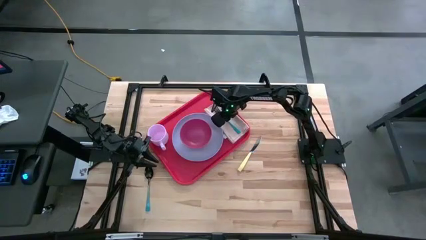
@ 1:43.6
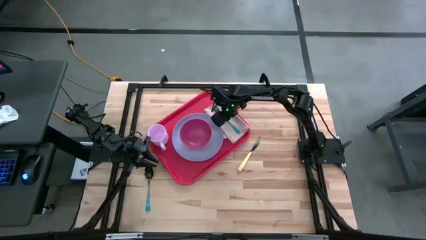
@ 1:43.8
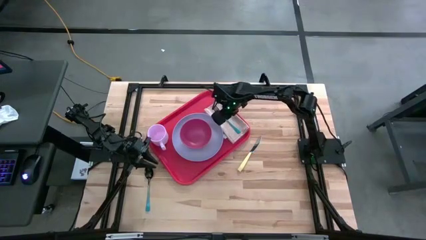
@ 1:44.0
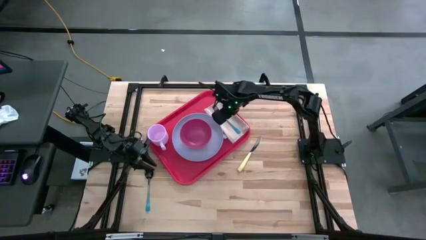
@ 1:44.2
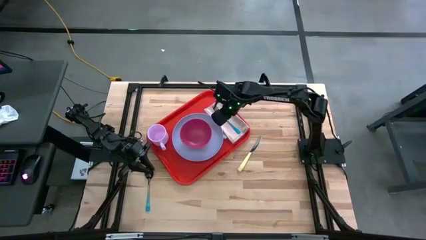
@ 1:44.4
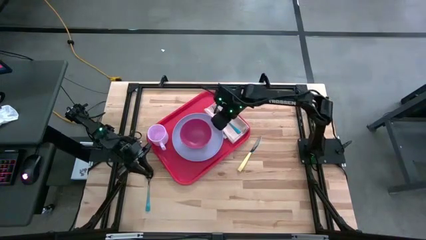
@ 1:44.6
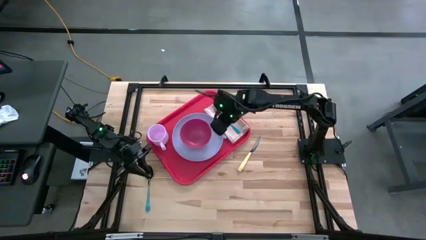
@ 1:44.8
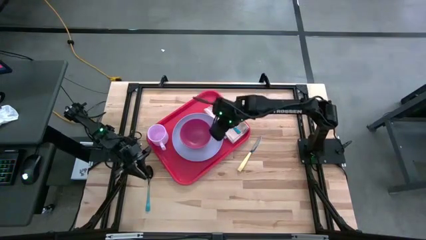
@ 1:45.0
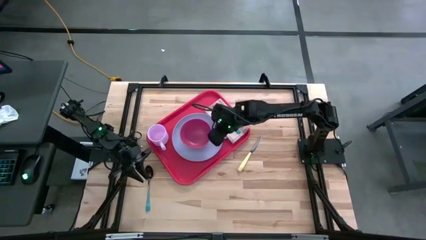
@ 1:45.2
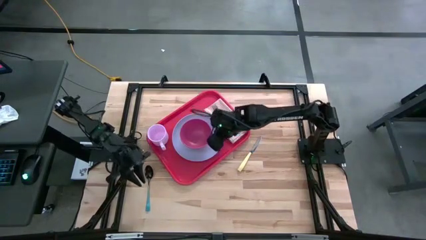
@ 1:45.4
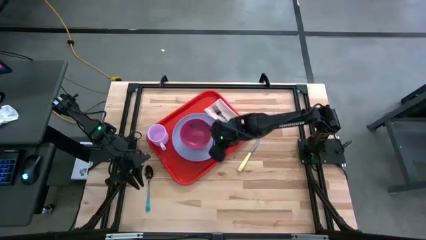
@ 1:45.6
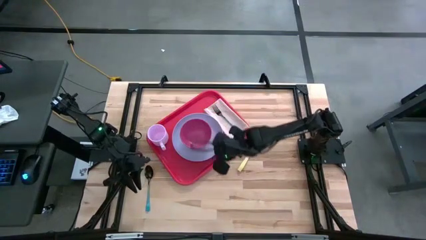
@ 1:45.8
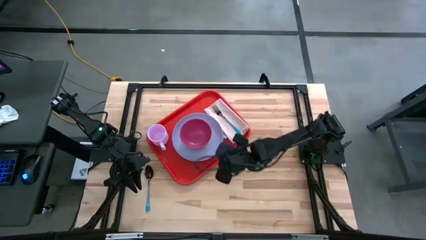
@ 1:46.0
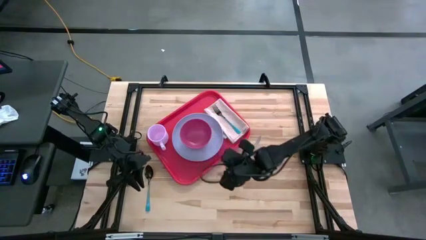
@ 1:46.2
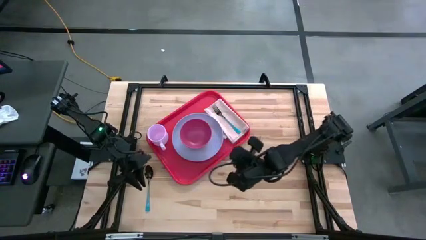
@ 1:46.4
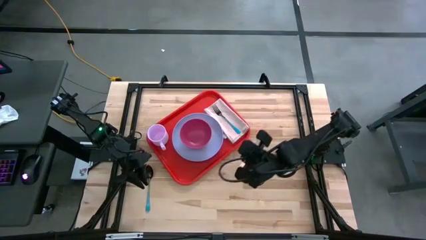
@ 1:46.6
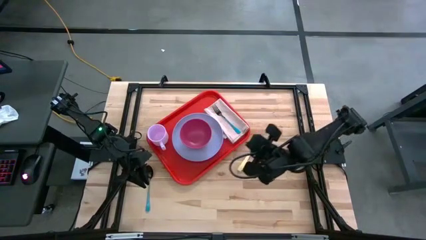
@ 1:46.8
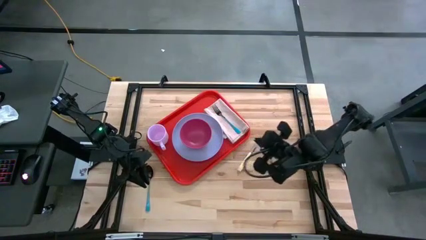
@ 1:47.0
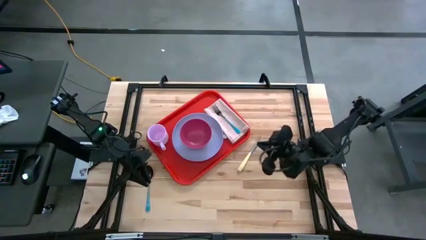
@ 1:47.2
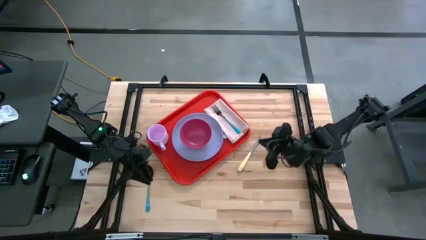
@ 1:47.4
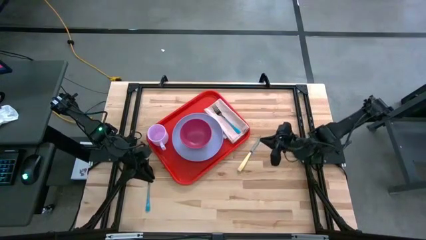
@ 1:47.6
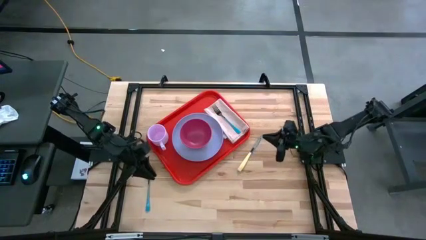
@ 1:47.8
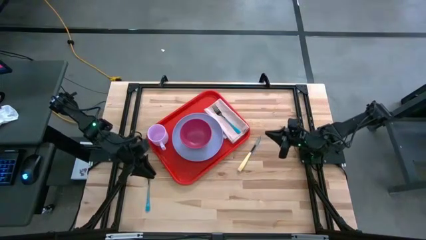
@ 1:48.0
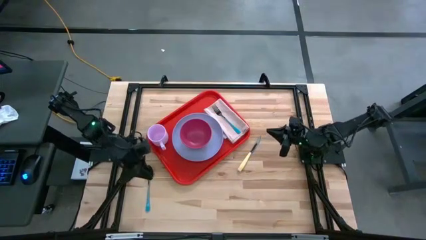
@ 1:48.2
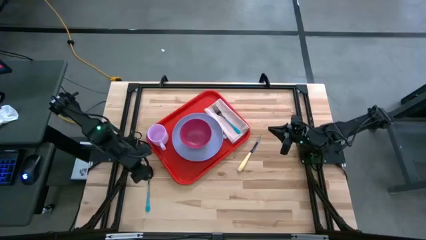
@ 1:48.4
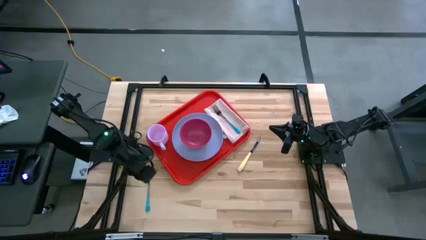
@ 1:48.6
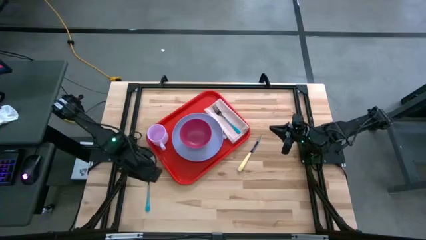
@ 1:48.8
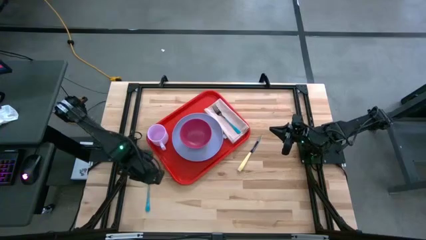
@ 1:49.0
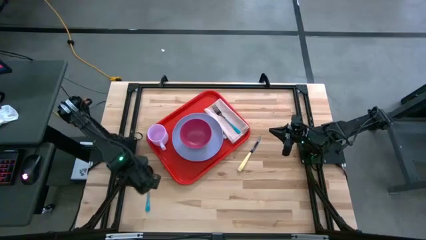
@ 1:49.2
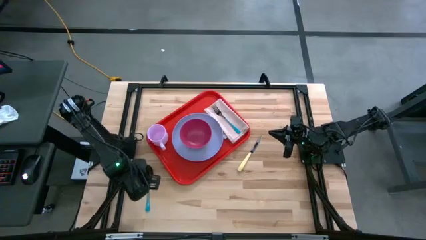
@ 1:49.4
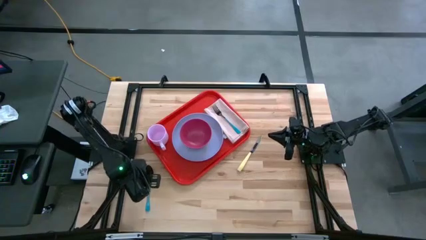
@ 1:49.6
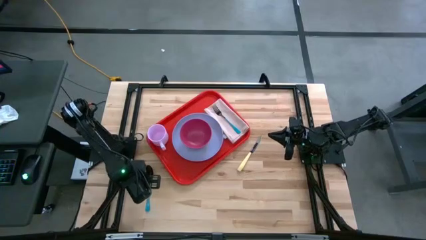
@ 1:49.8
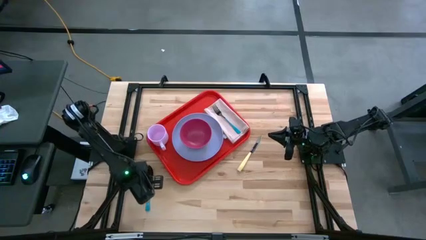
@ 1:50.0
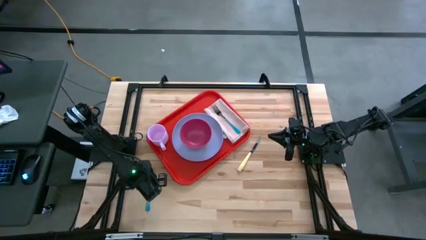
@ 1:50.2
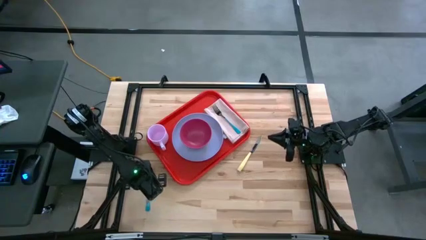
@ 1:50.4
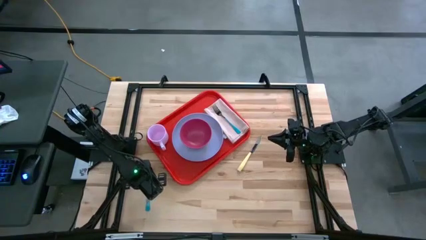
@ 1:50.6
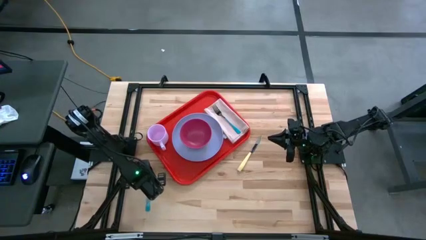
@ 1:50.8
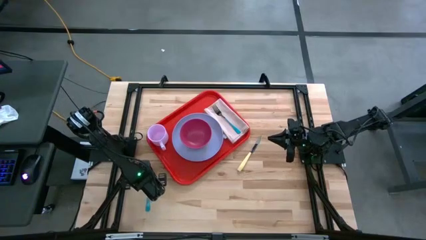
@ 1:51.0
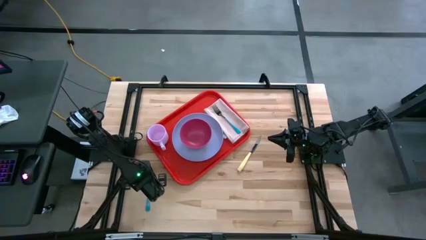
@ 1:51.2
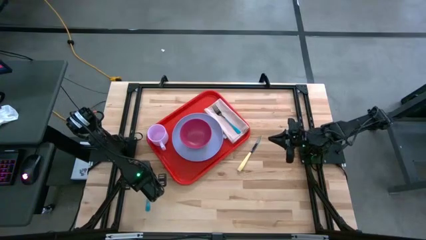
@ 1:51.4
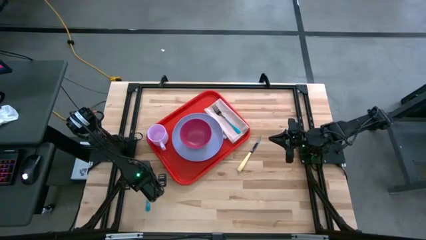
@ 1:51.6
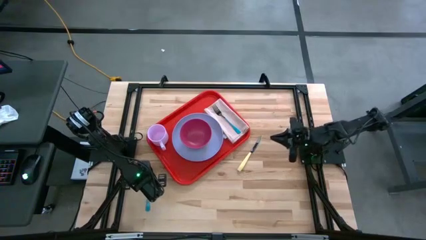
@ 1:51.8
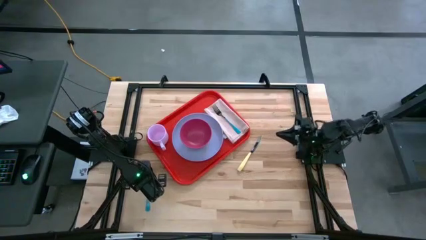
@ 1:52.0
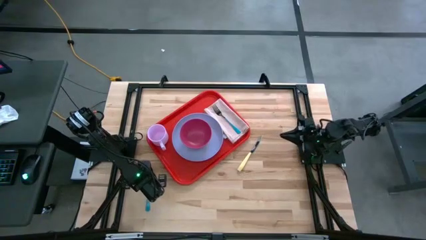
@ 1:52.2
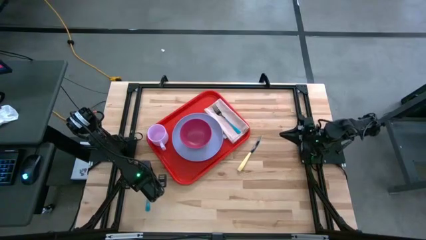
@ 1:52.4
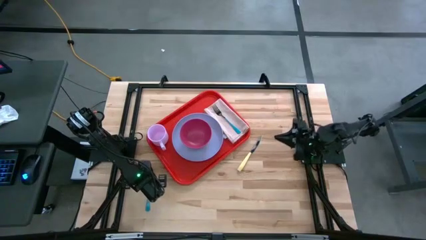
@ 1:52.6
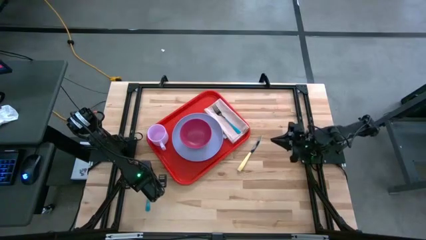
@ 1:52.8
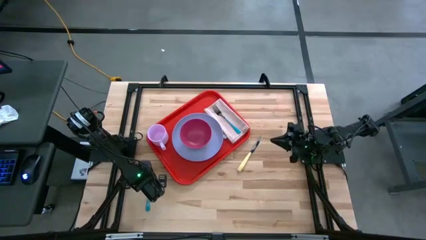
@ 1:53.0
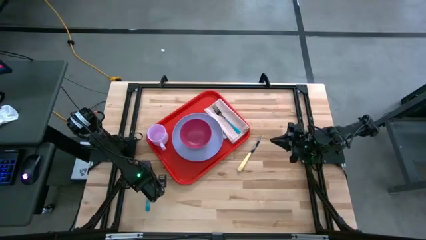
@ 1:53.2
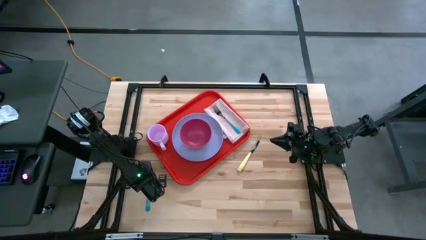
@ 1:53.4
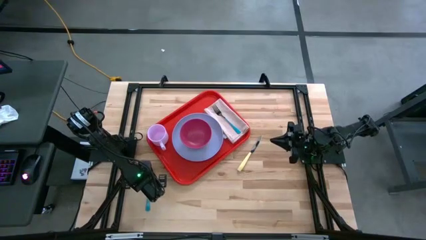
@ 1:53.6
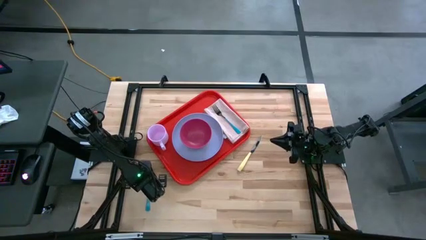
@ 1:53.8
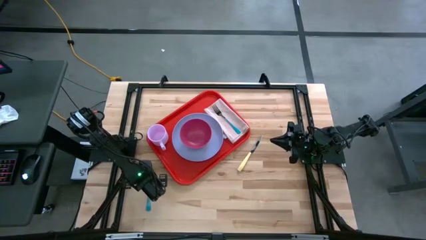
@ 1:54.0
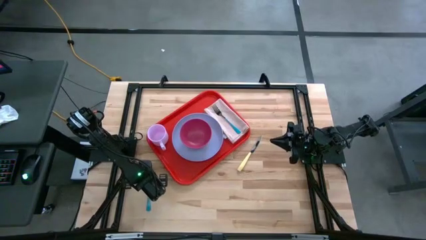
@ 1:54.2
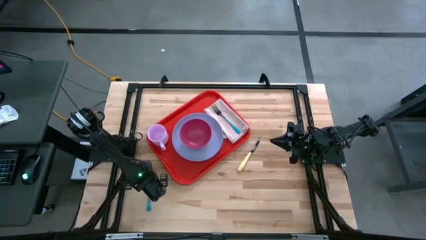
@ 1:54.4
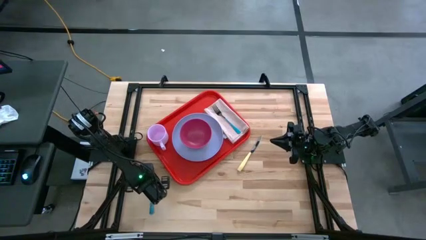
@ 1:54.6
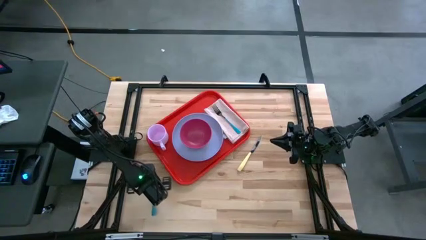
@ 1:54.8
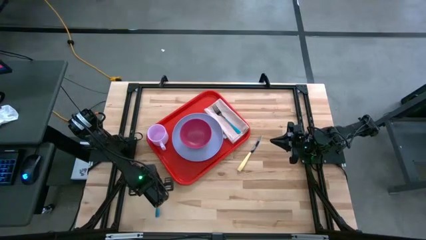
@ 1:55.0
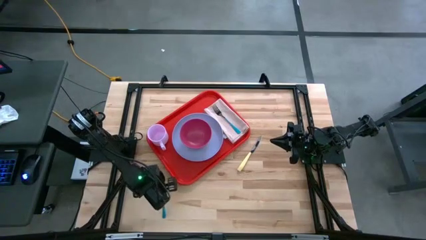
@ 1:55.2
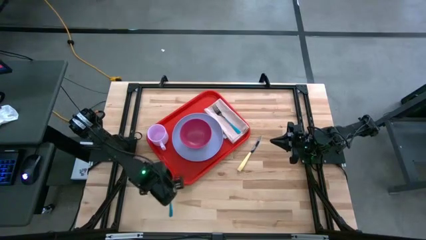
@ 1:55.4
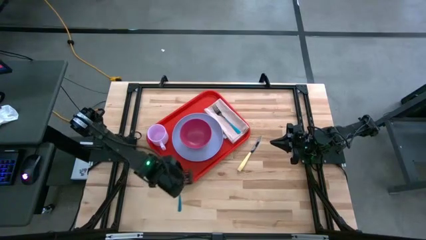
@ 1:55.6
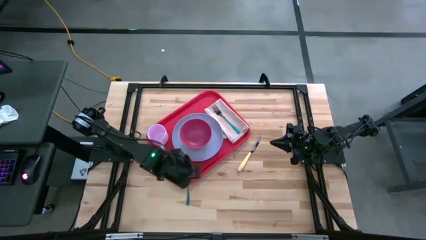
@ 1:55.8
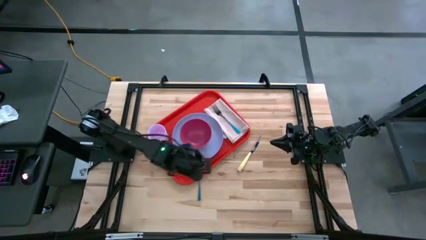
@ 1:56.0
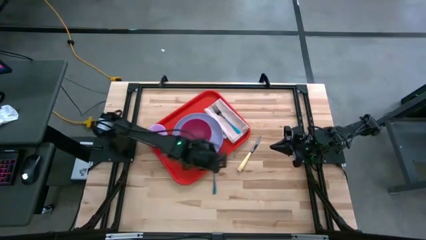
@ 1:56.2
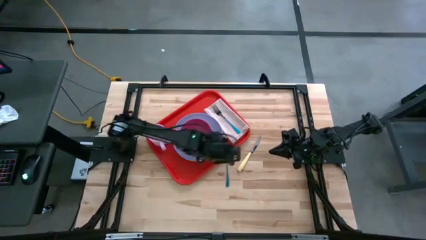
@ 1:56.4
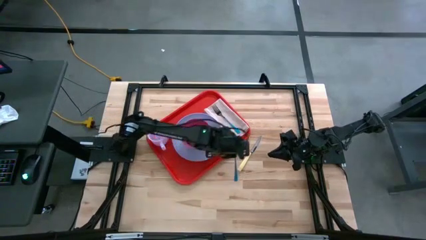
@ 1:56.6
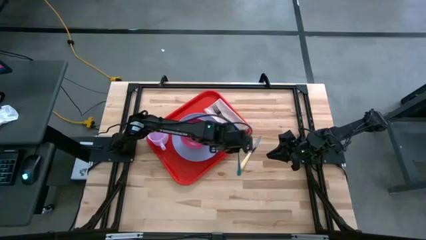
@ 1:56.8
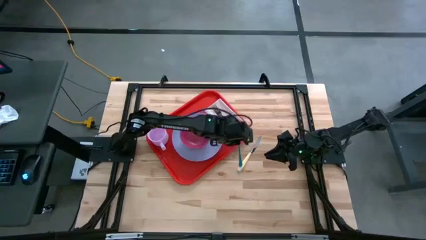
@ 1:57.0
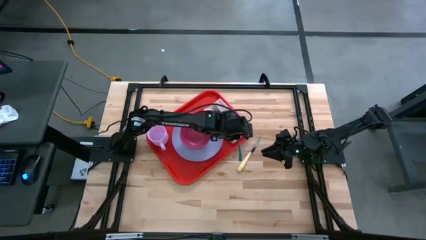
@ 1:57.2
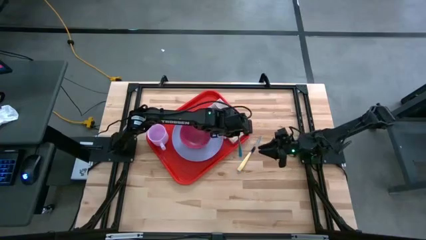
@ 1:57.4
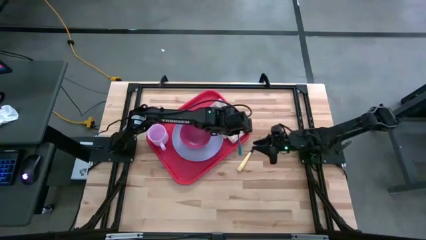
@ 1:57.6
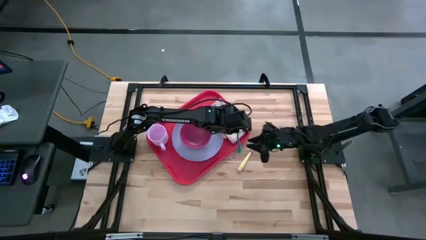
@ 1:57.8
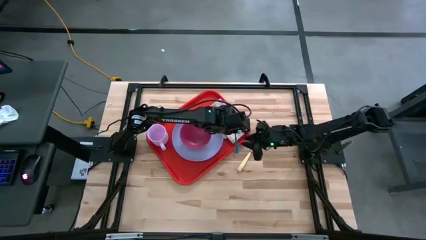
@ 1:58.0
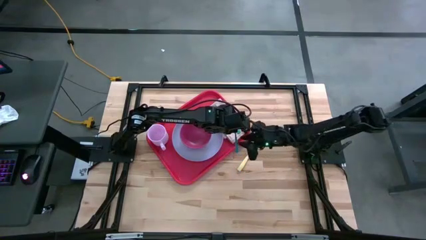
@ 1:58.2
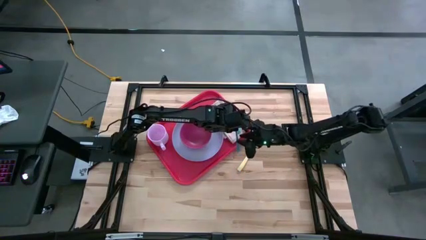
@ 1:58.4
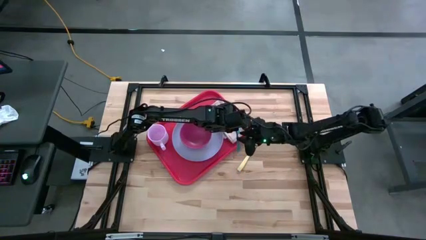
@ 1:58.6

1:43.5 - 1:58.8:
Task: Set up tray
Put the blue spoon on top of the brown table napkin to the left of the blue fork on the red serving tray

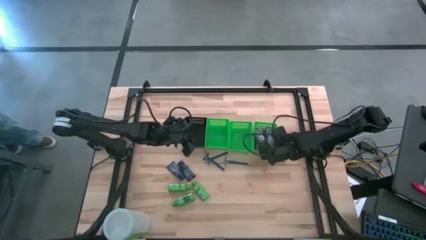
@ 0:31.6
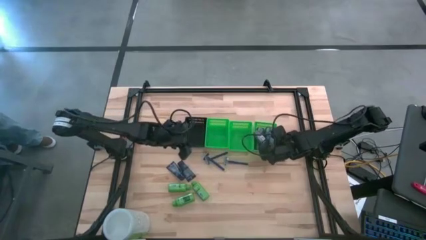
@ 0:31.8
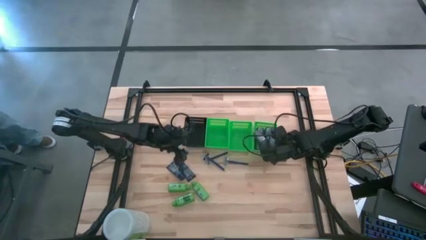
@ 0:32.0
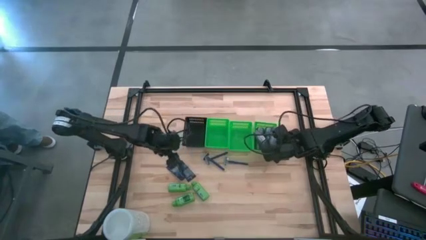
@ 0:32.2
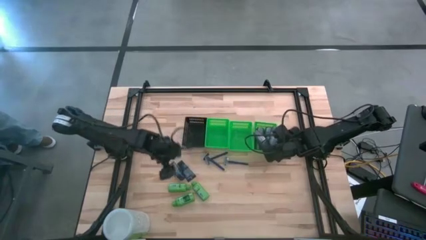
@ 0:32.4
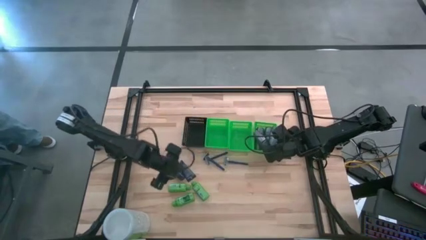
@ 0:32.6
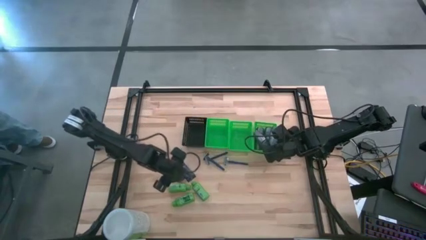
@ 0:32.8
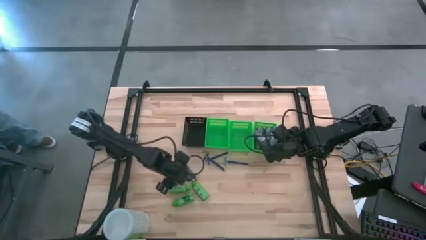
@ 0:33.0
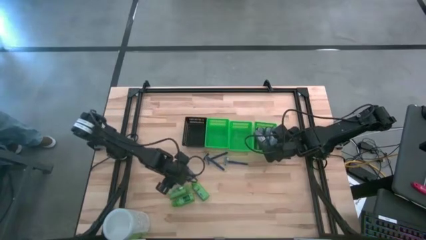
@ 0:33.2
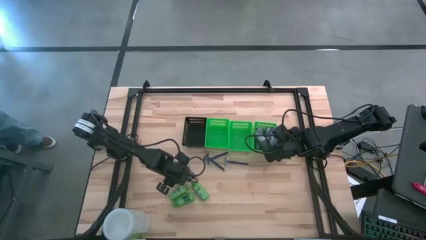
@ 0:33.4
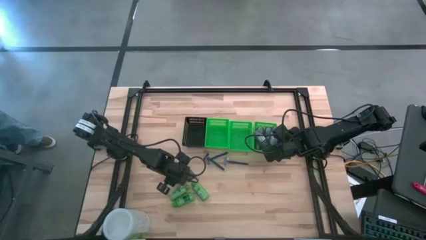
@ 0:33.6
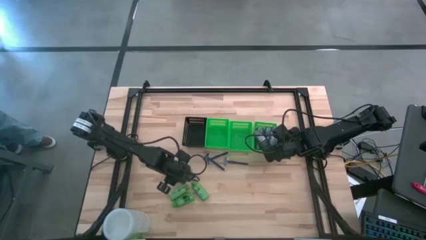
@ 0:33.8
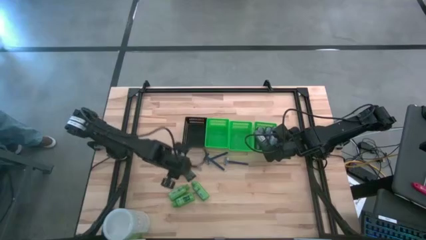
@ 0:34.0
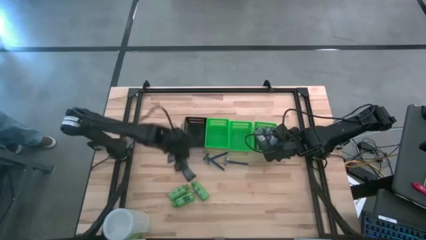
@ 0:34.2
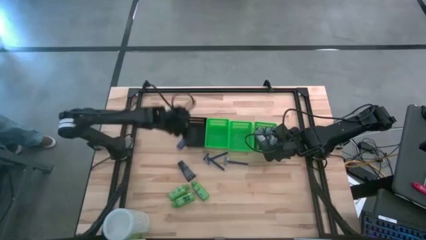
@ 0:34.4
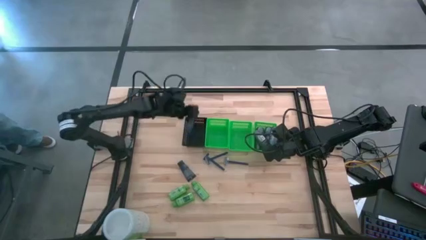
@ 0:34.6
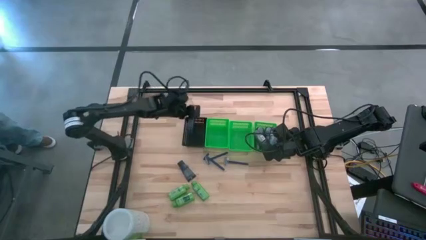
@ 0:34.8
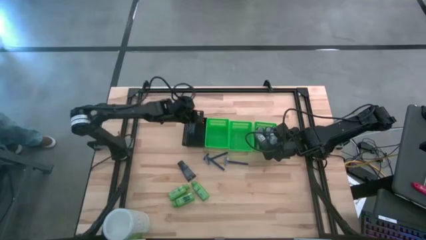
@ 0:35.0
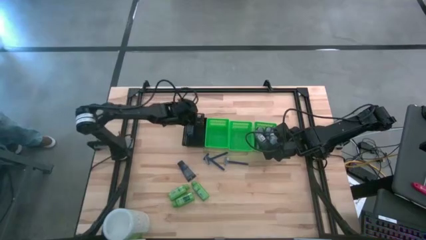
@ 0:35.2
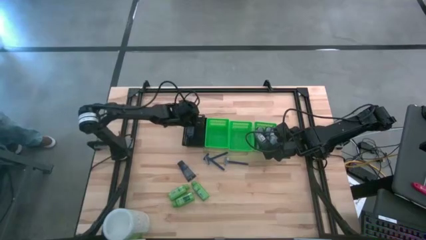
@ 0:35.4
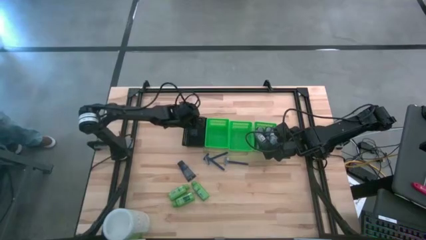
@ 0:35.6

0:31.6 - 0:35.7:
Task: Pick & Place Travel size toiletries
Put the blue shave cream into the black basket
